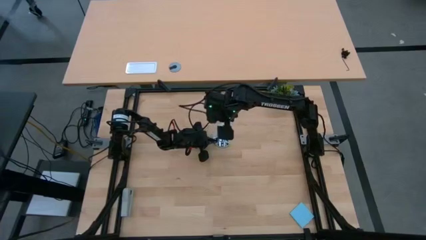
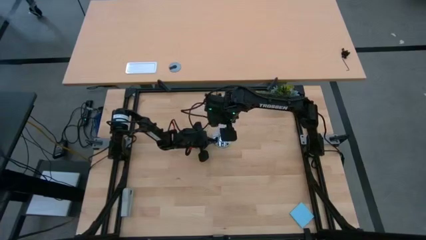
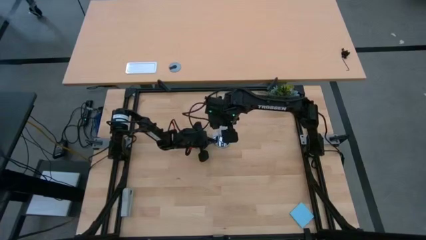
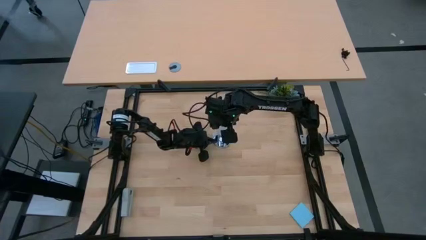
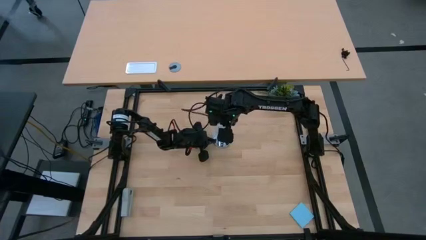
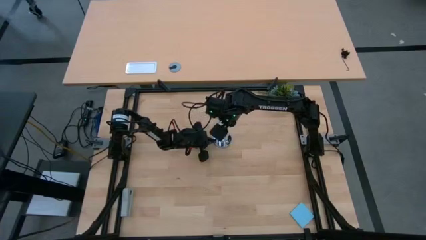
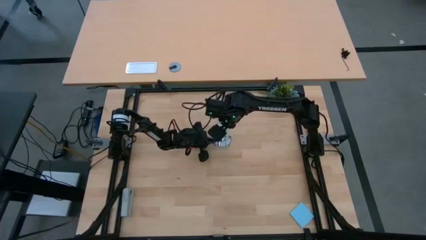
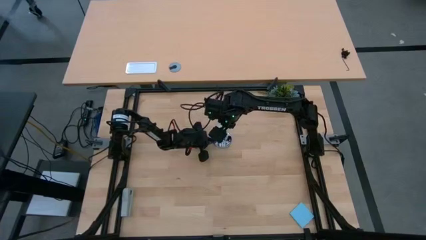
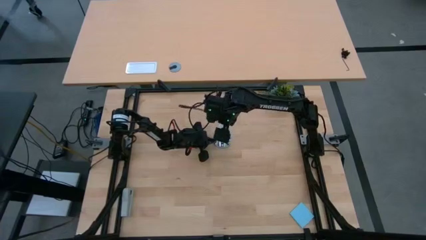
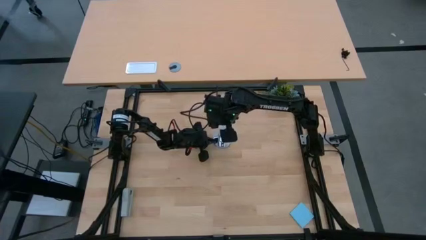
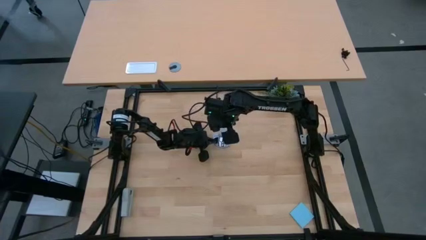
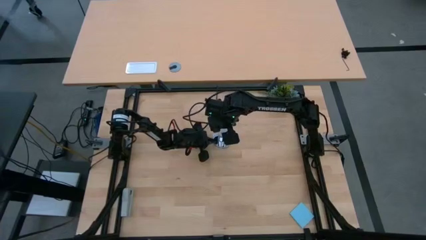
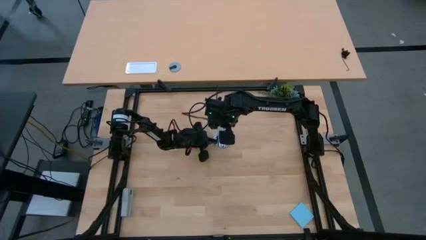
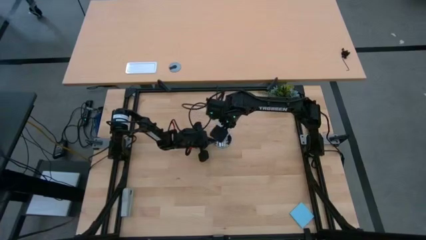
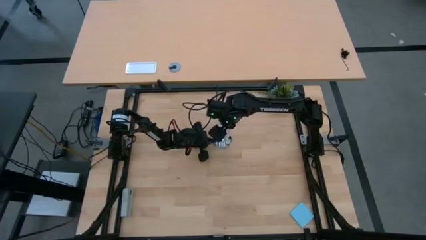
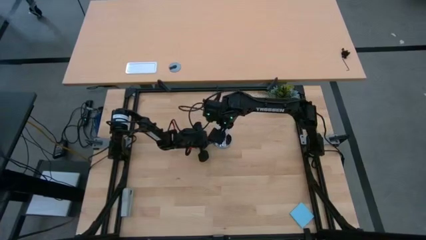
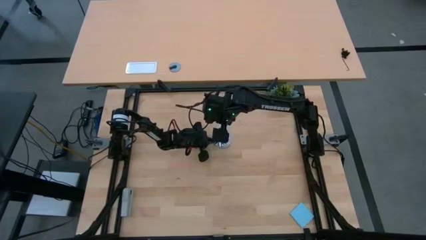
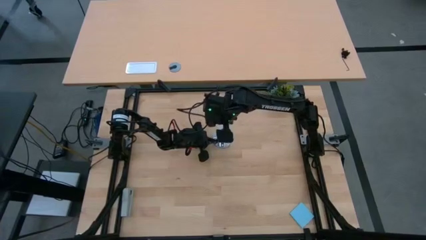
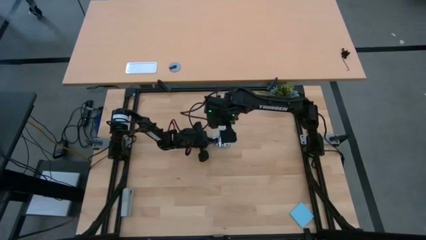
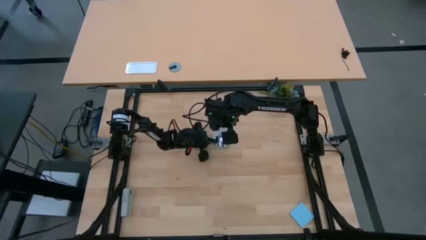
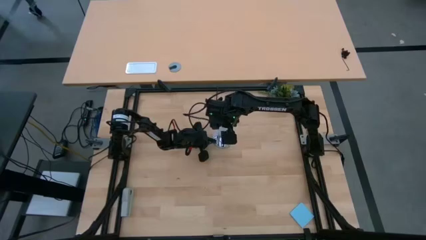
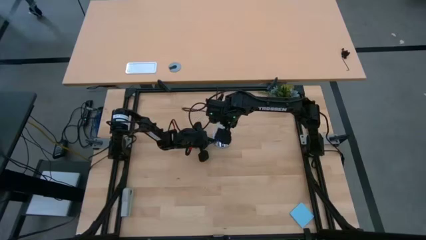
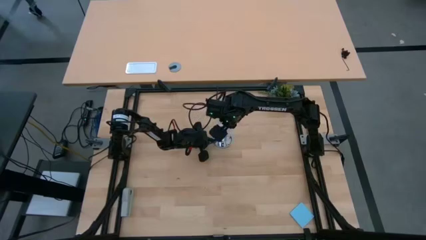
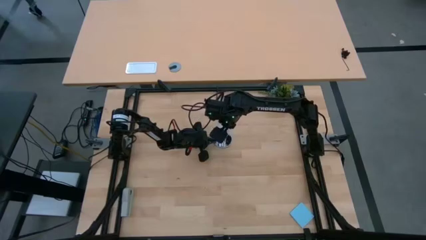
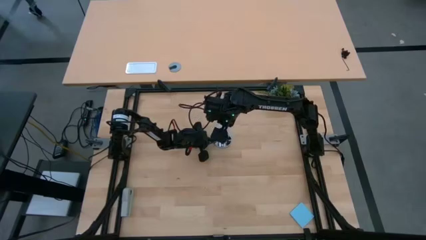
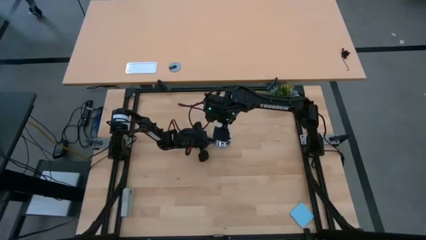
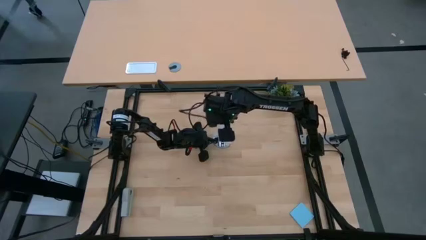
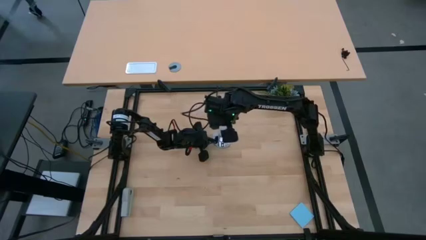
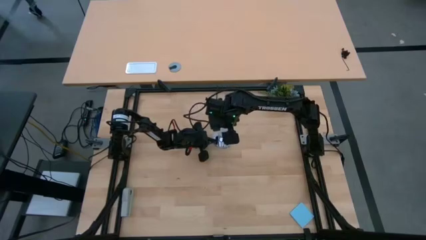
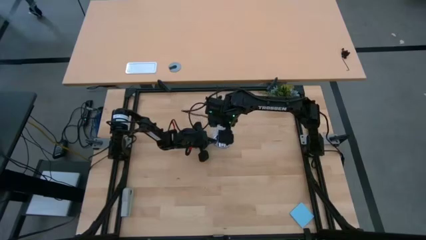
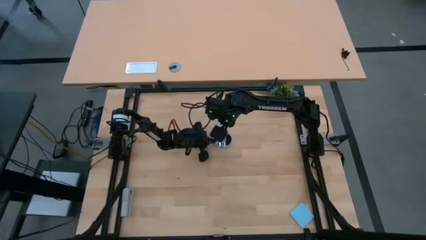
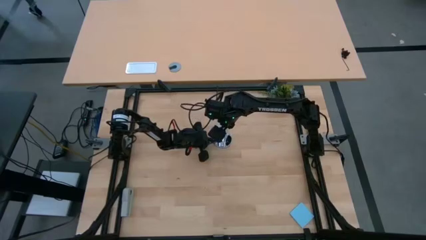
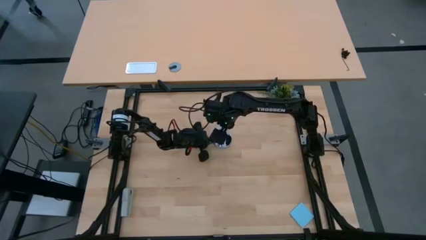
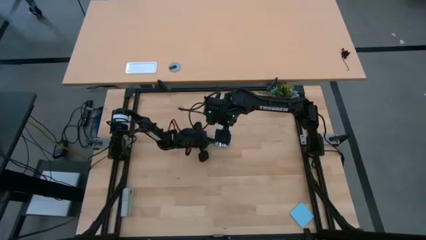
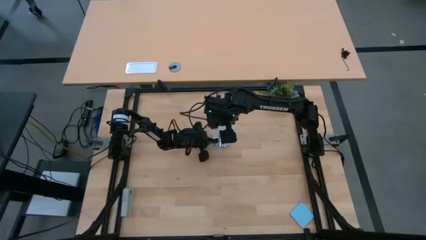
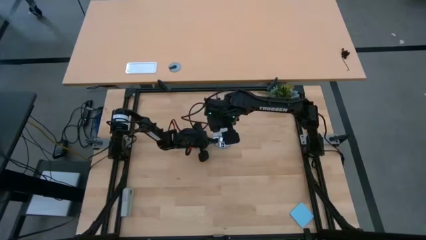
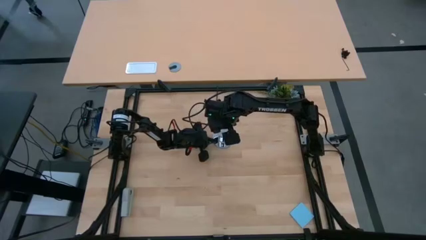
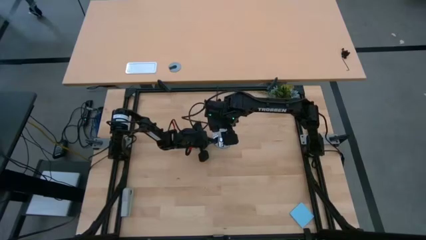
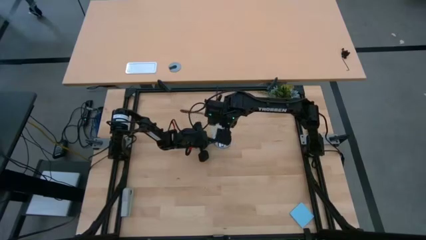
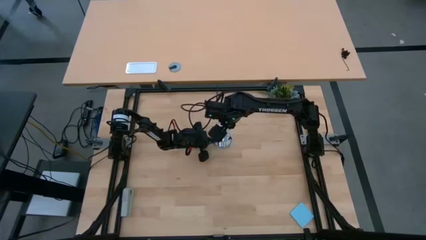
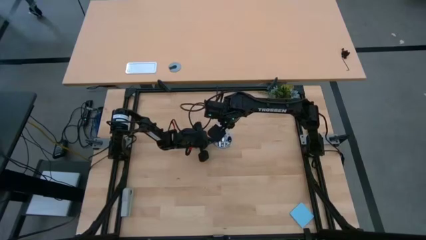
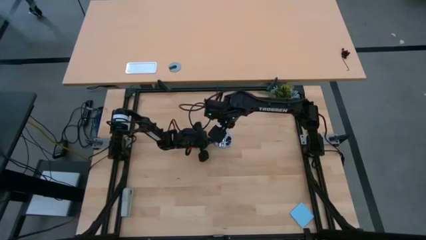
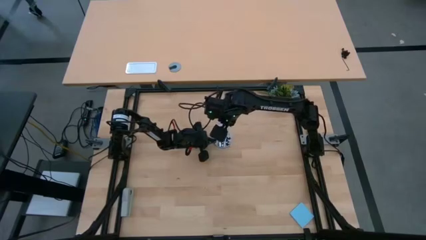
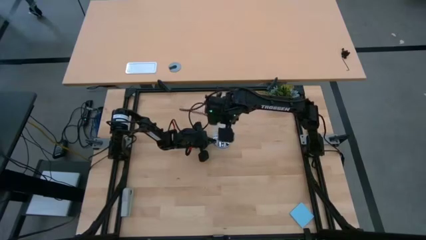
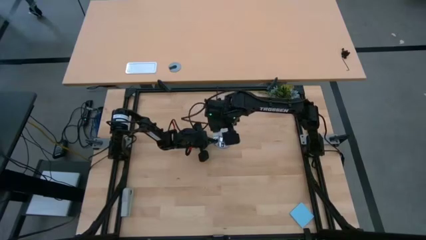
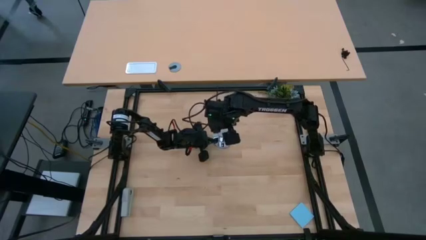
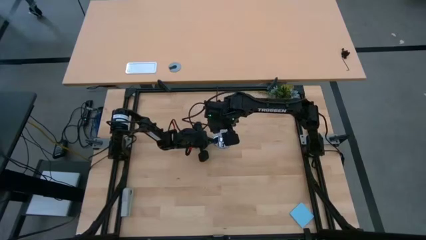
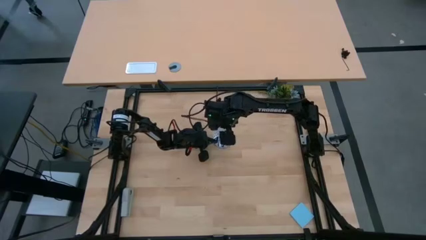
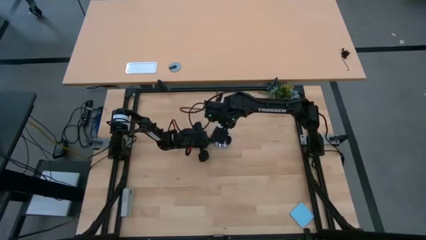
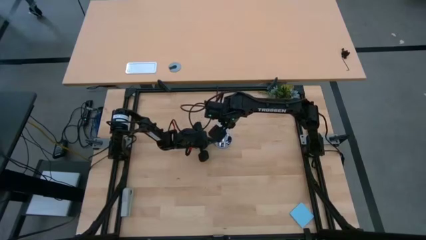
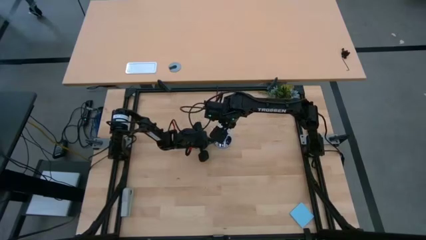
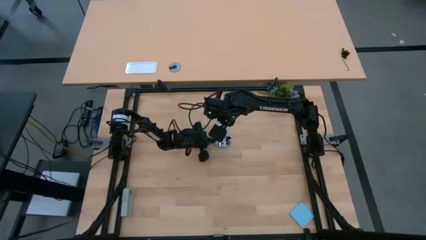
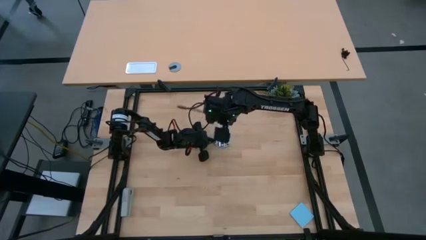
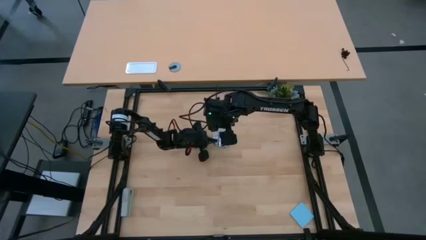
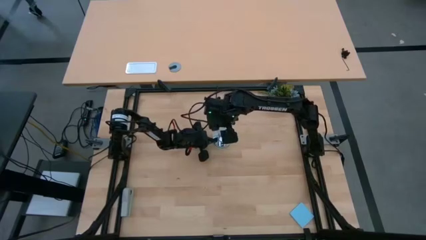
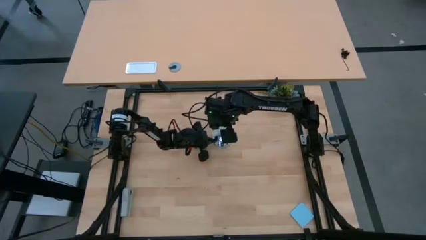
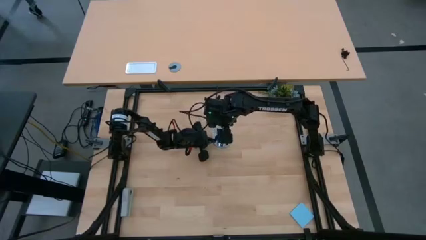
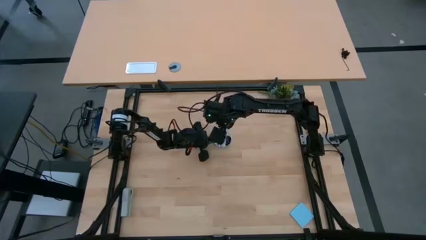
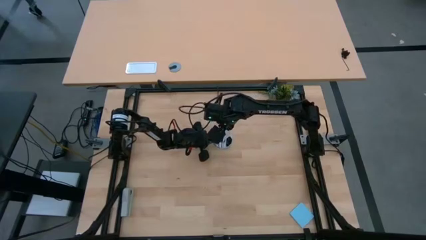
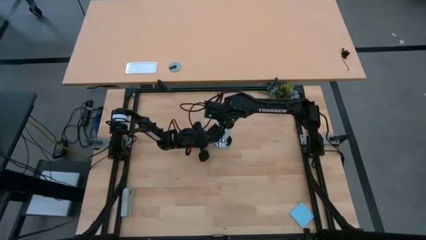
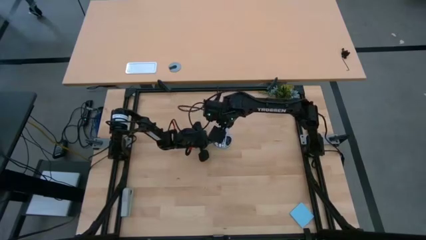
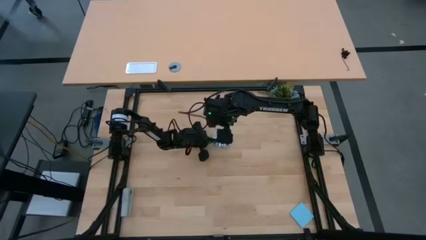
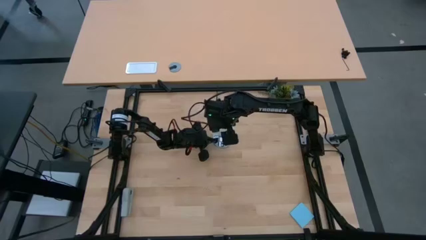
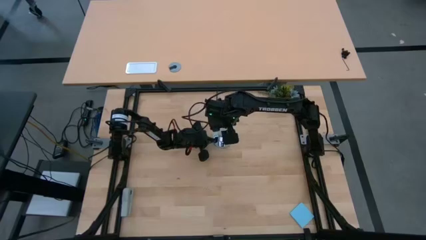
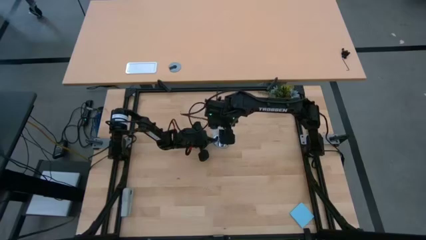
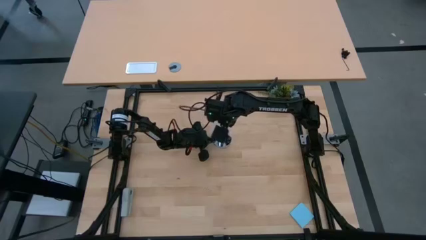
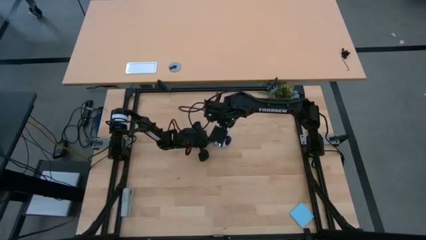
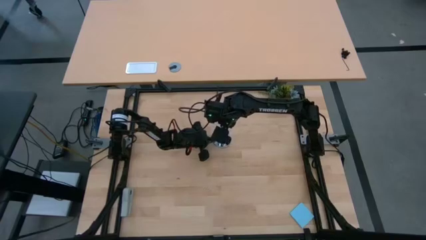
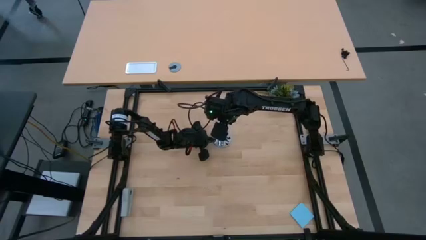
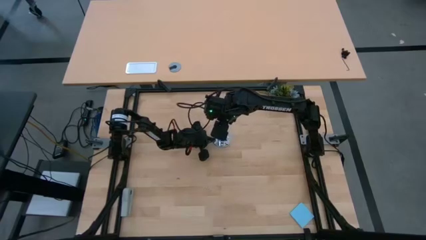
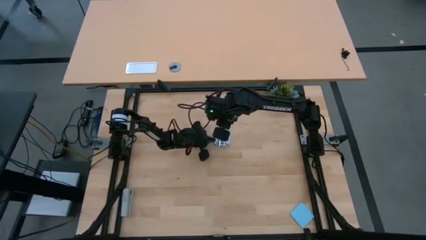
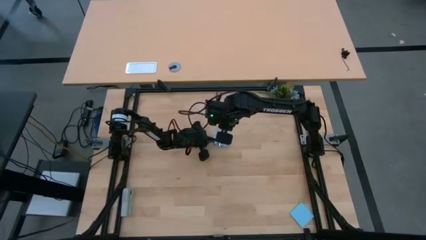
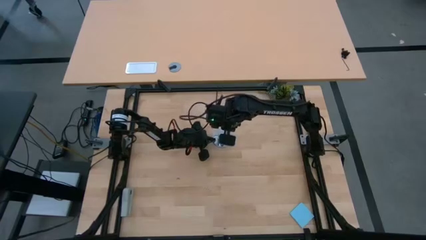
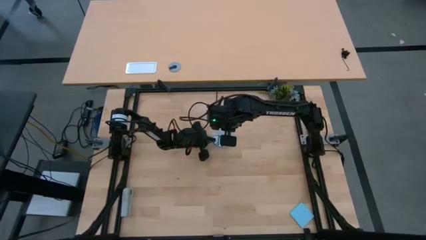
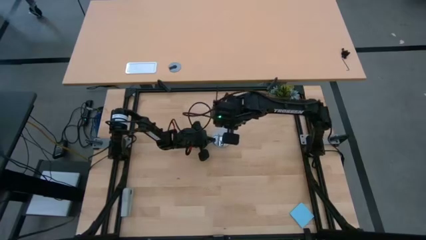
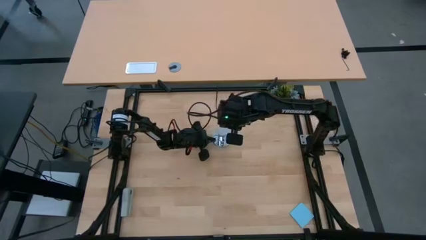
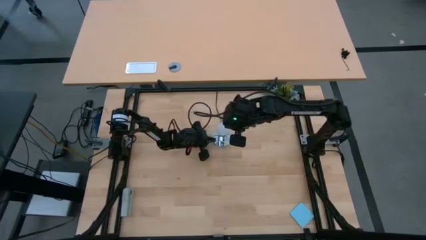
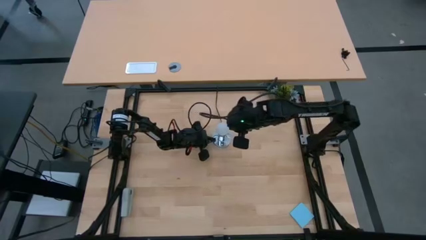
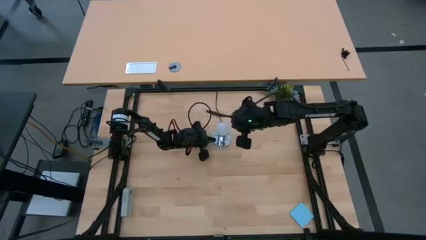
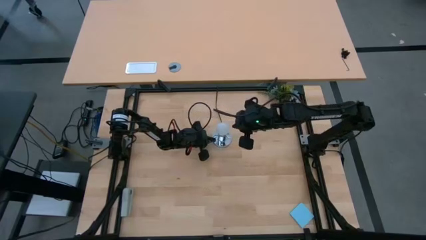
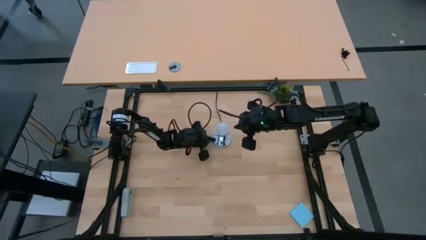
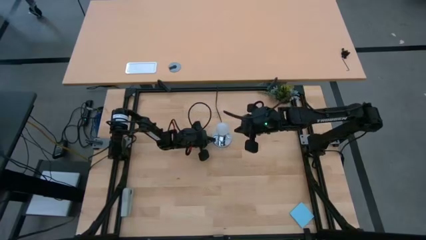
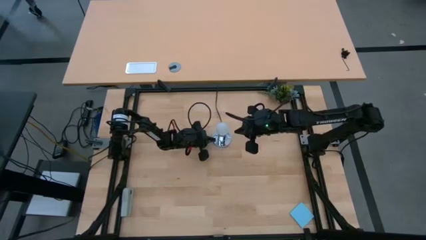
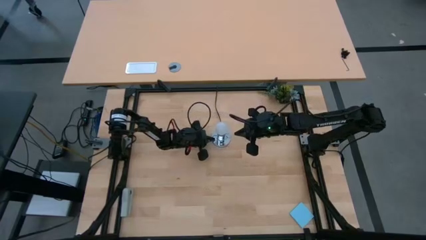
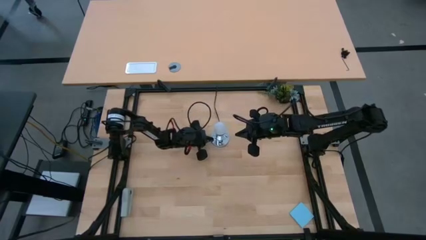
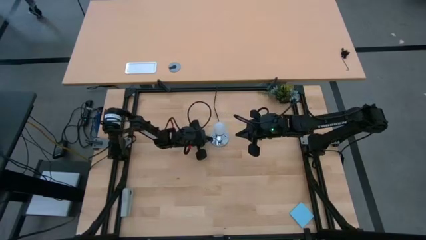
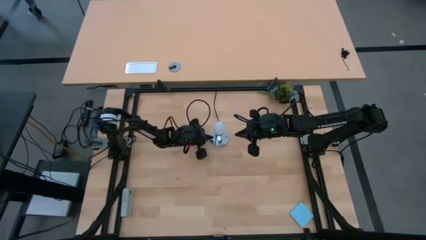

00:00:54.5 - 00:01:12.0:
Task: Screw lightbulb
Insert the lightbulb into the lamp socket
